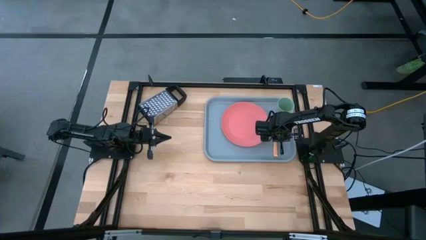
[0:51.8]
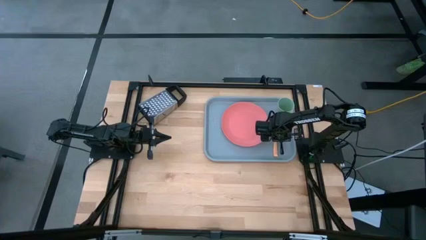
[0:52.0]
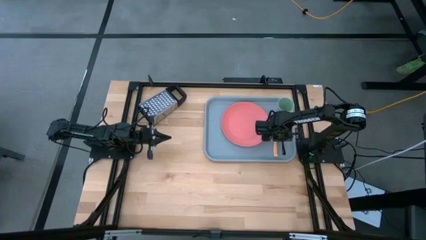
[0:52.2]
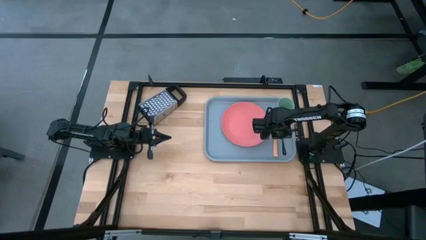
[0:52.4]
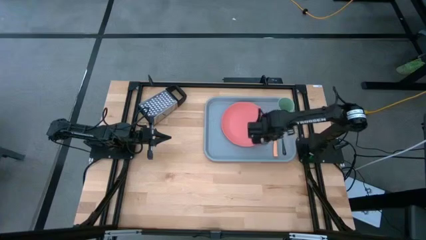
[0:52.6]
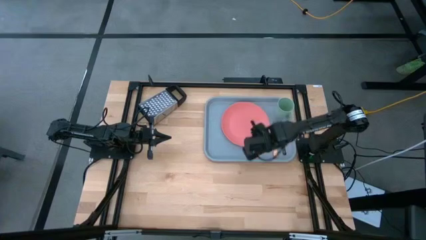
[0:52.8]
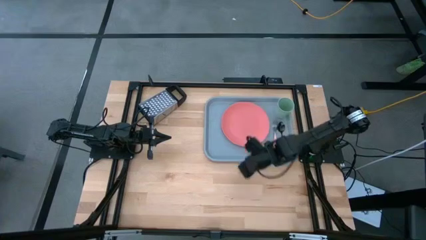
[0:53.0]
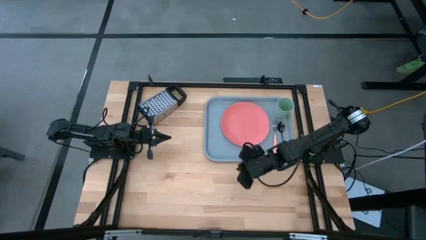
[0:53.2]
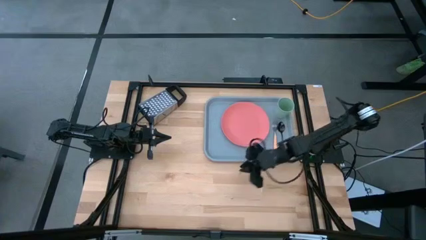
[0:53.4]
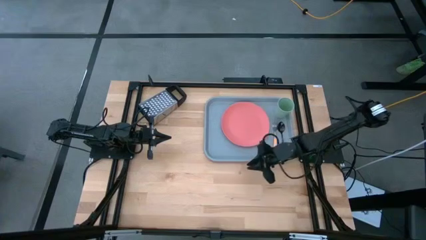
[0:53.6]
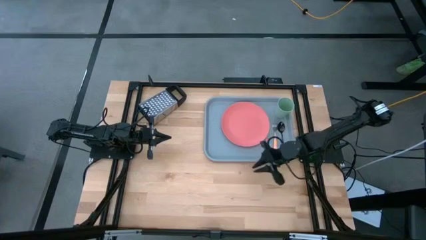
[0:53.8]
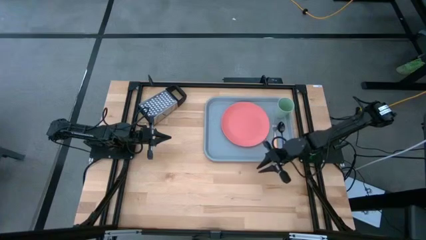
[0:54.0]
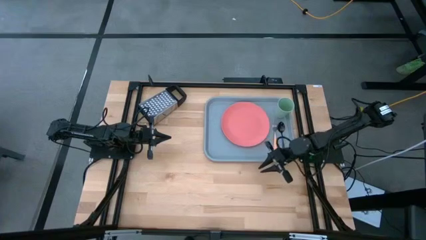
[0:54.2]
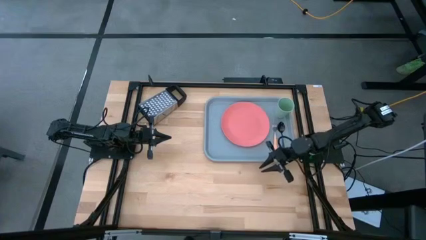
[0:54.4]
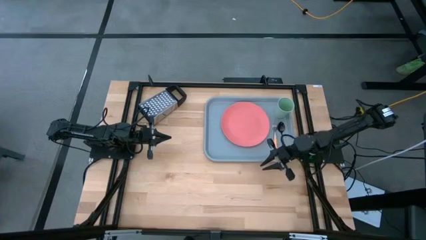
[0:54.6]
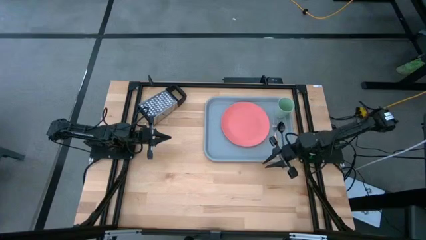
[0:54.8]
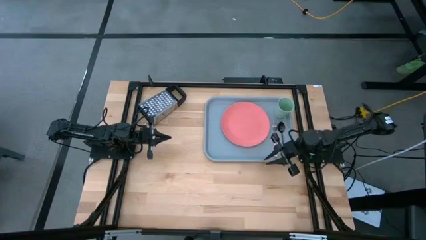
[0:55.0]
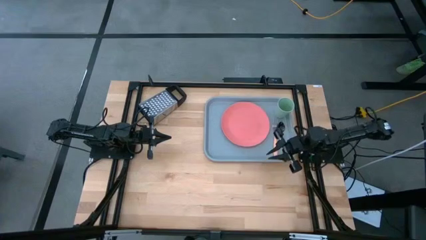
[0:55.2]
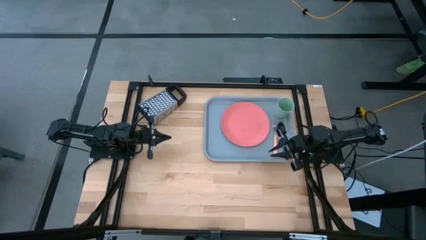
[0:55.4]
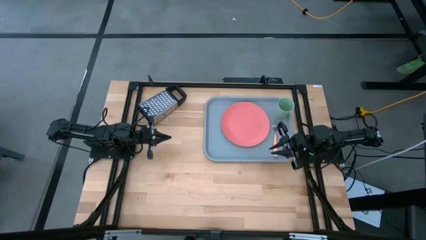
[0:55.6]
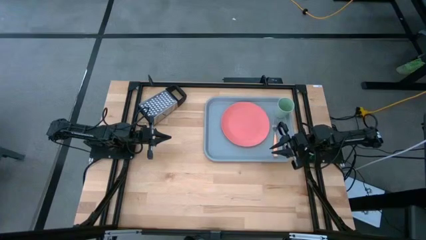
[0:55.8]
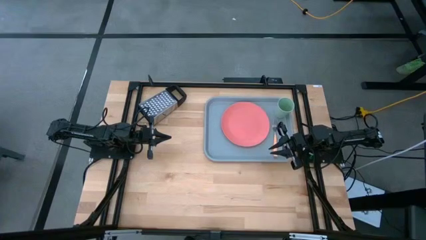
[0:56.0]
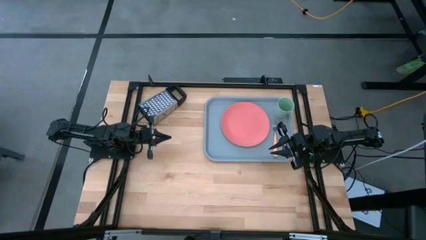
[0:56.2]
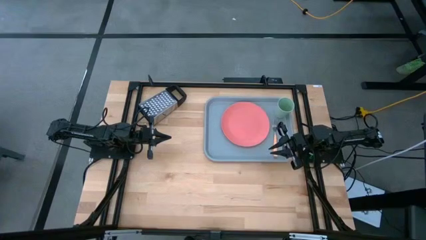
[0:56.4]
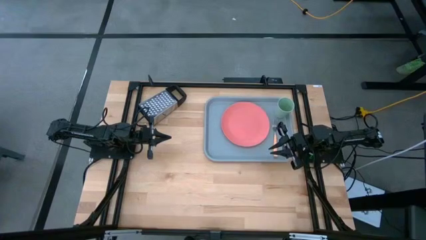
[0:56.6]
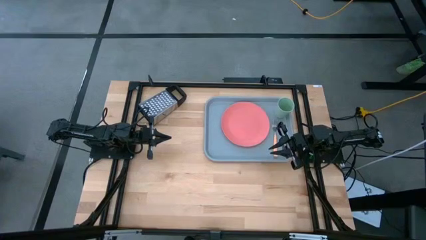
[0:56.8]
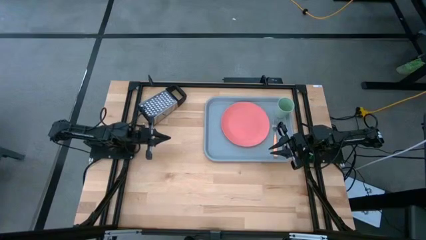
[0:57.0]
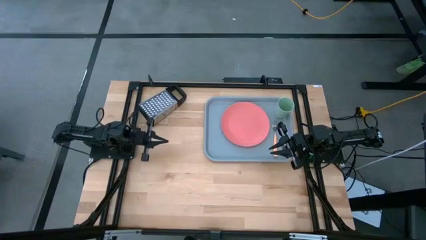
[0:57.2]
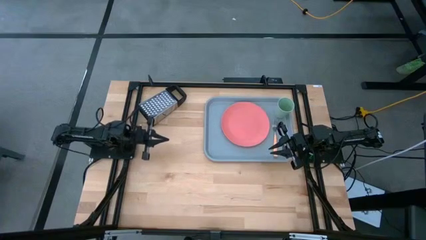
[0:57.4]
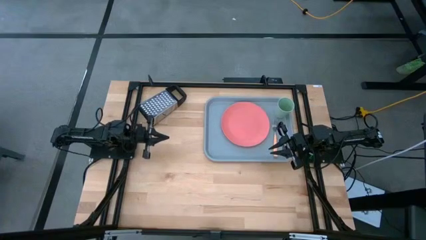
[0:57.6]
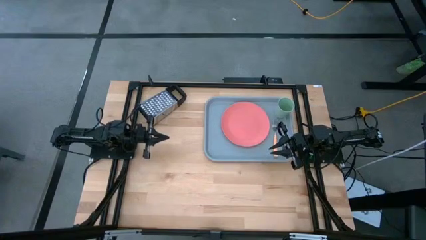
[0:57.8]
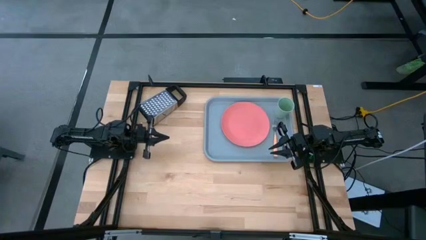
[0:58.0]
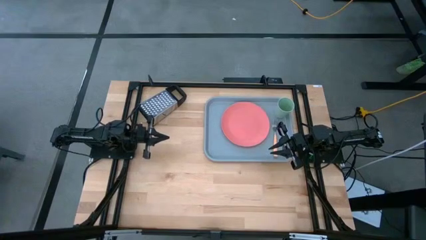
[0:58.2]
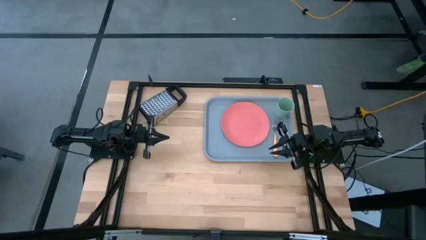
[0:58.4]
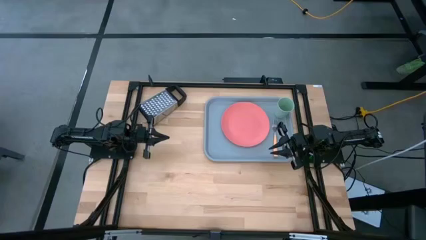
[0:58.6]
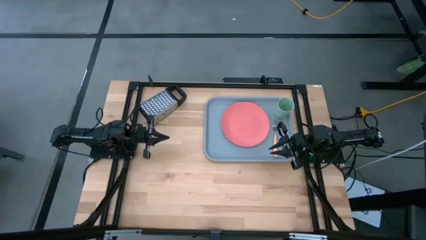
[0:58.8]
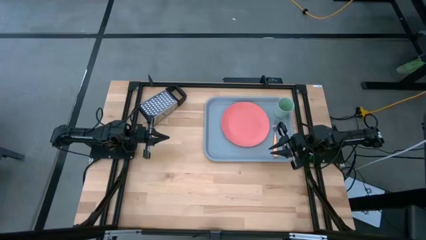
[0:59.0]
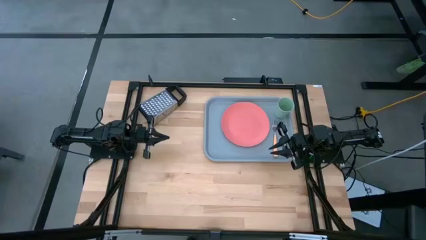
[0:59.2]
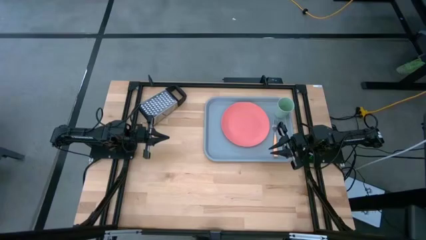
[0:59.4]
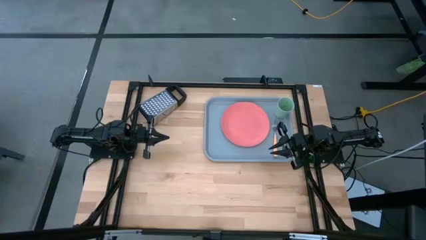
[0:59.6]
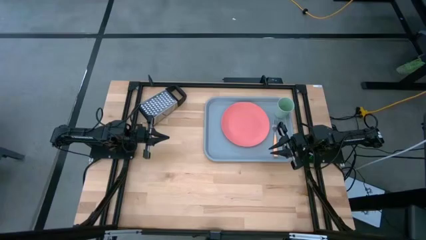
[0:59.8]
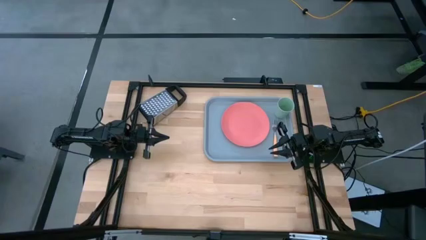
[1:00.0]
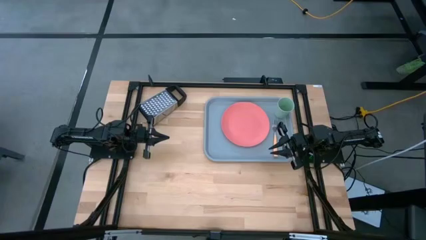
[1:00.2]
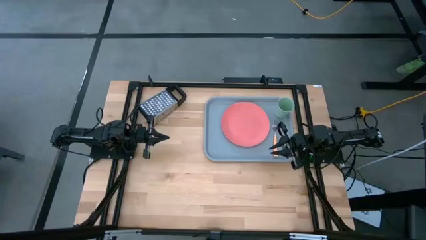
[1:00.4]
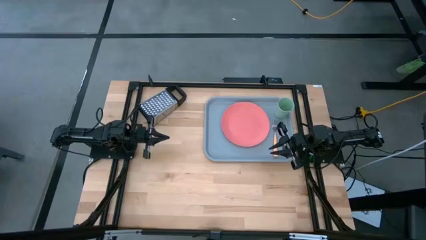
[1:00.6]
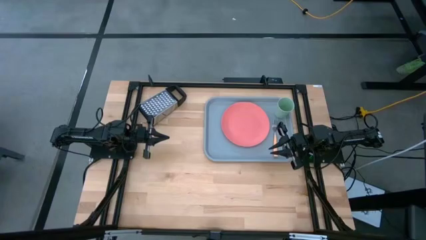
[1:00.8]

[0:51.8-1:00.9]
Task: Pick and place plate/cup/fork/spoon on tray
Return to Home Position

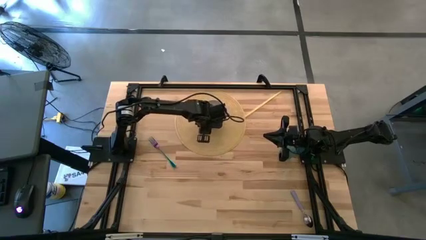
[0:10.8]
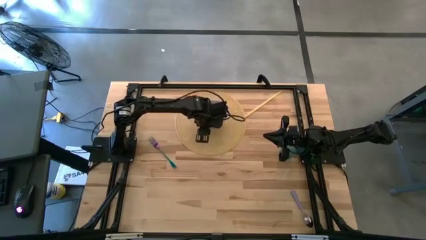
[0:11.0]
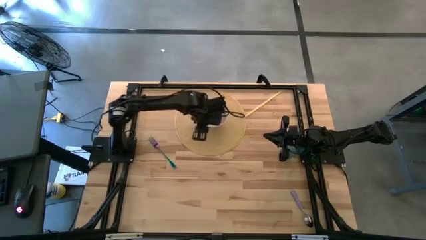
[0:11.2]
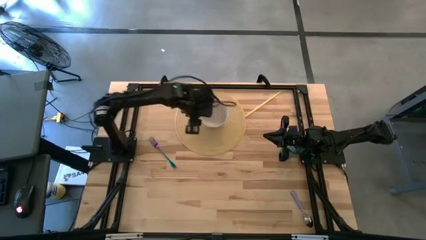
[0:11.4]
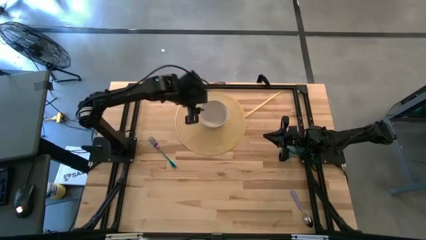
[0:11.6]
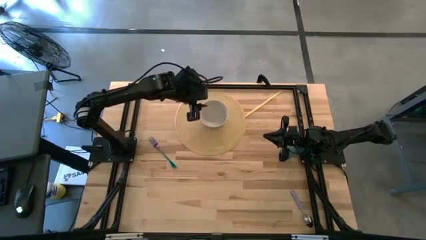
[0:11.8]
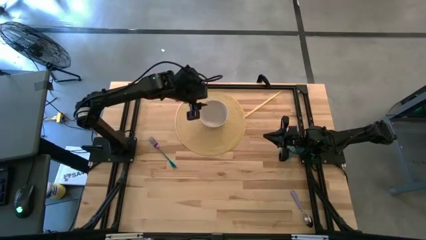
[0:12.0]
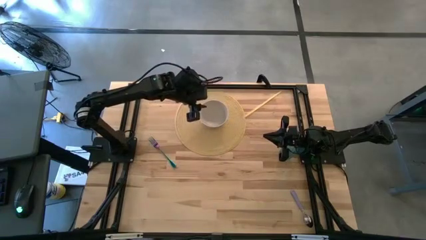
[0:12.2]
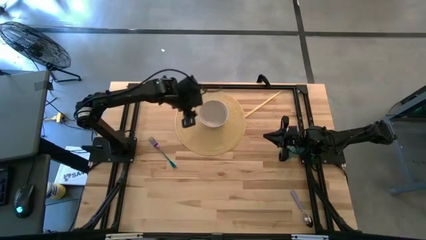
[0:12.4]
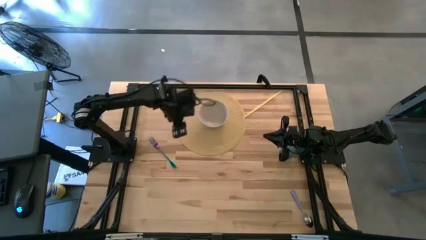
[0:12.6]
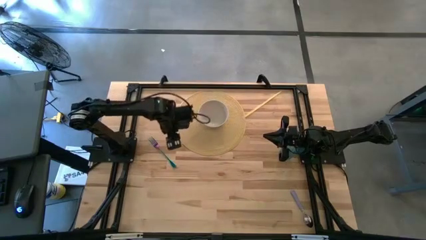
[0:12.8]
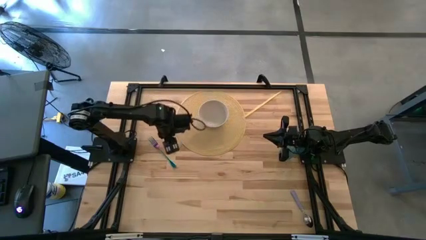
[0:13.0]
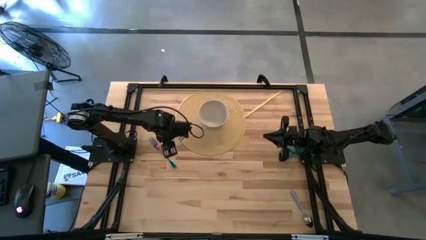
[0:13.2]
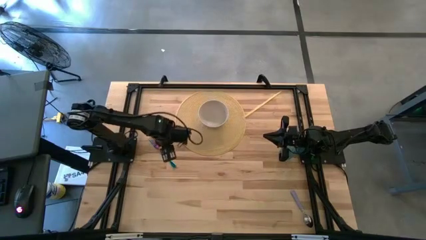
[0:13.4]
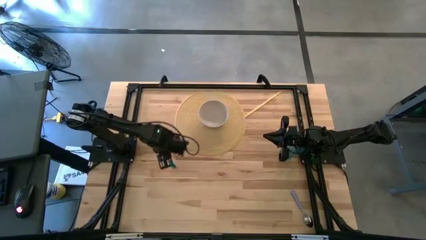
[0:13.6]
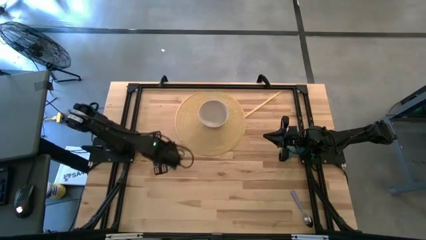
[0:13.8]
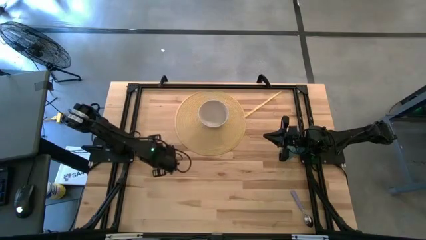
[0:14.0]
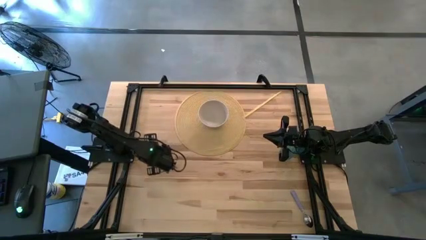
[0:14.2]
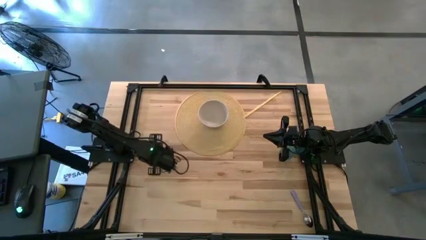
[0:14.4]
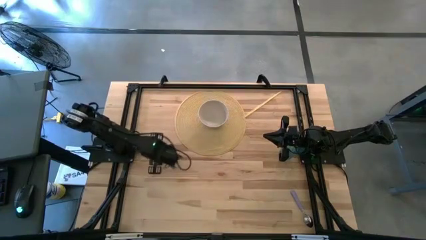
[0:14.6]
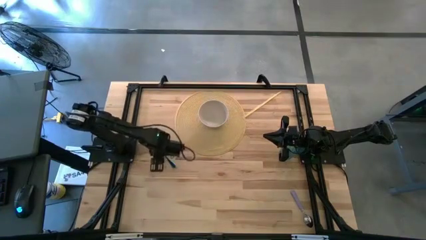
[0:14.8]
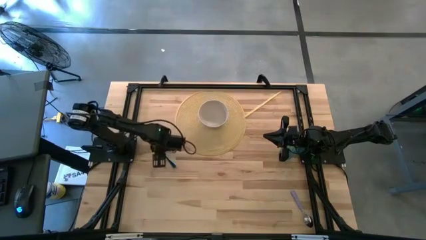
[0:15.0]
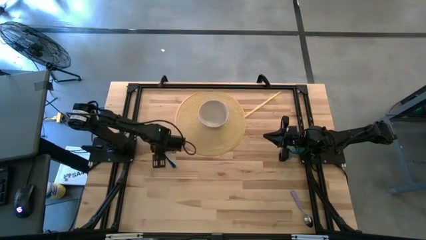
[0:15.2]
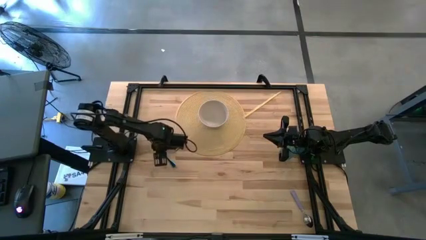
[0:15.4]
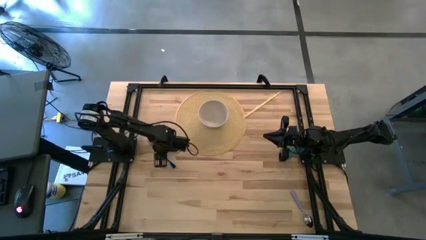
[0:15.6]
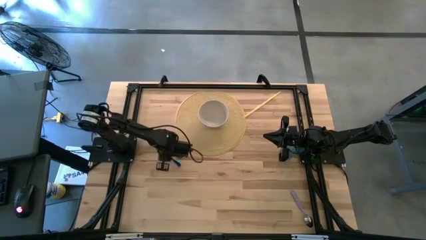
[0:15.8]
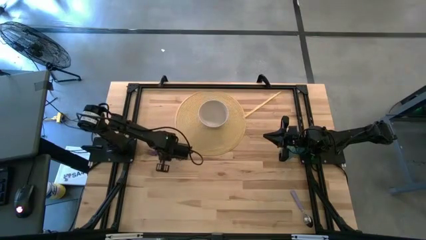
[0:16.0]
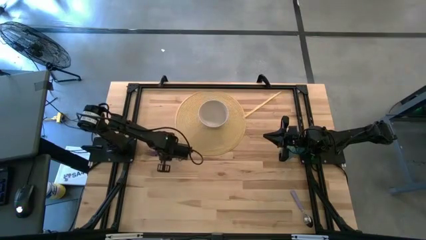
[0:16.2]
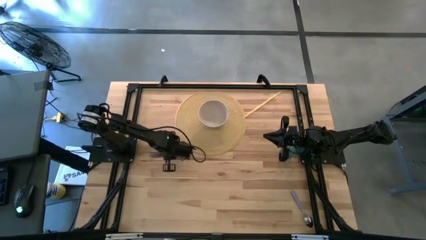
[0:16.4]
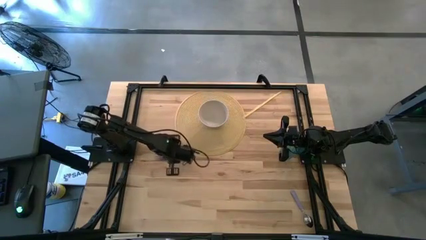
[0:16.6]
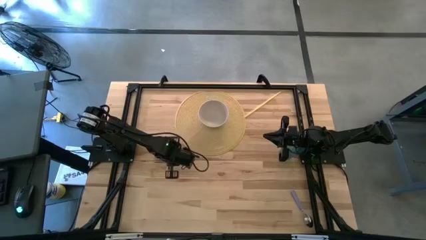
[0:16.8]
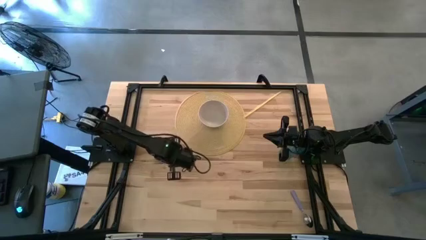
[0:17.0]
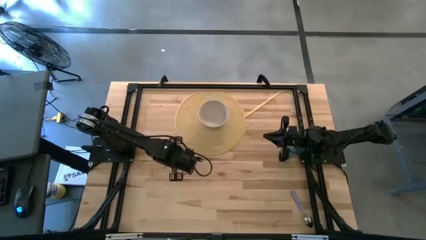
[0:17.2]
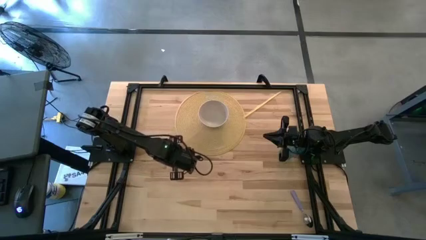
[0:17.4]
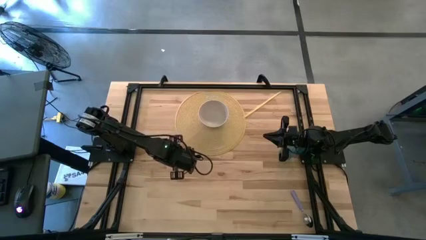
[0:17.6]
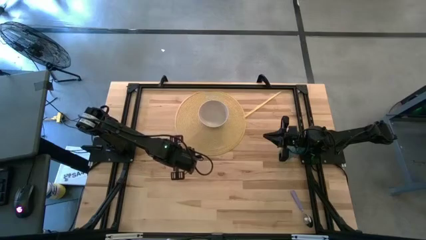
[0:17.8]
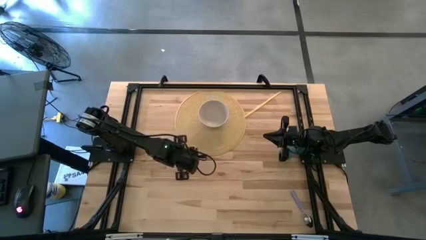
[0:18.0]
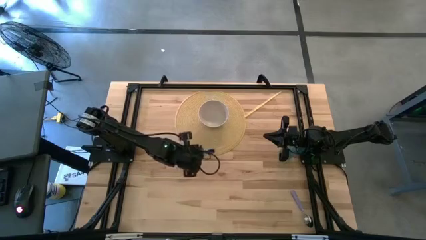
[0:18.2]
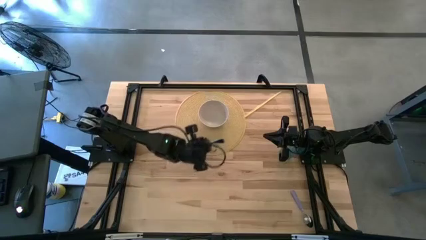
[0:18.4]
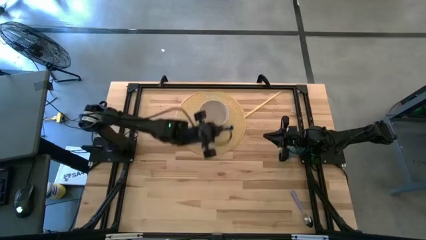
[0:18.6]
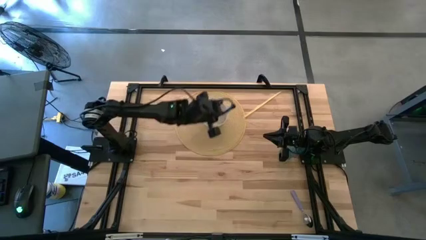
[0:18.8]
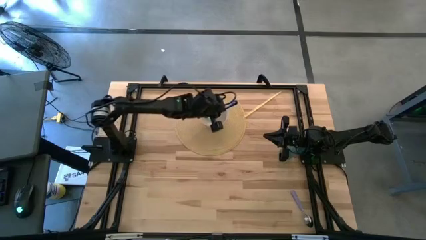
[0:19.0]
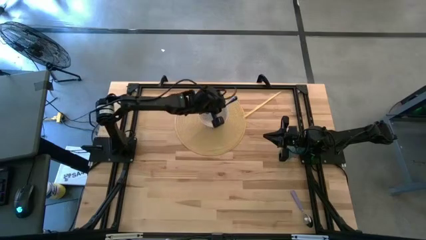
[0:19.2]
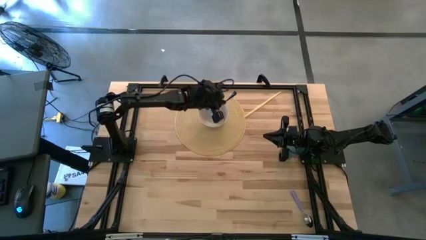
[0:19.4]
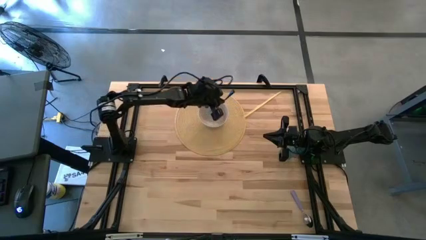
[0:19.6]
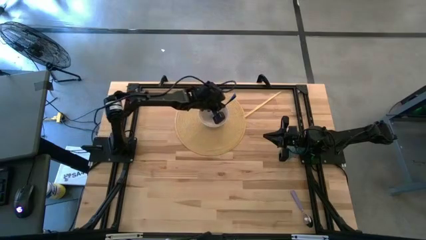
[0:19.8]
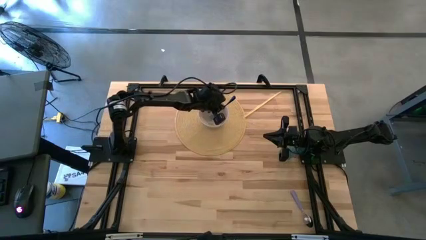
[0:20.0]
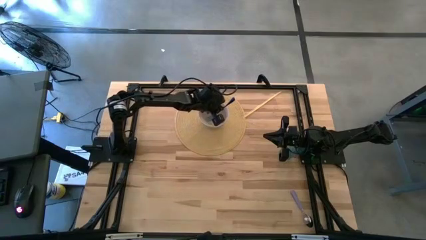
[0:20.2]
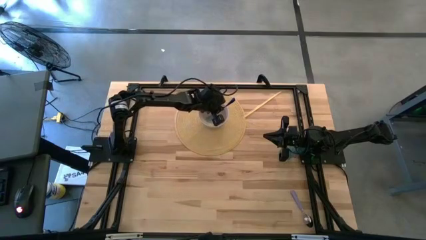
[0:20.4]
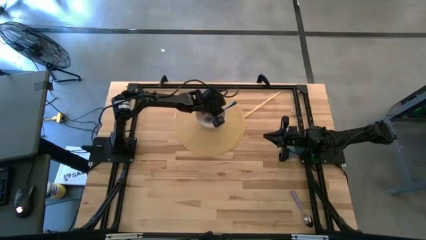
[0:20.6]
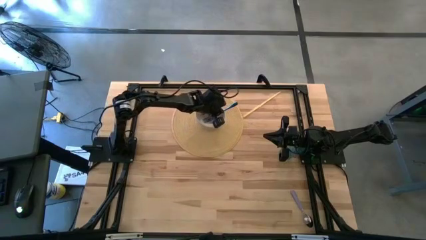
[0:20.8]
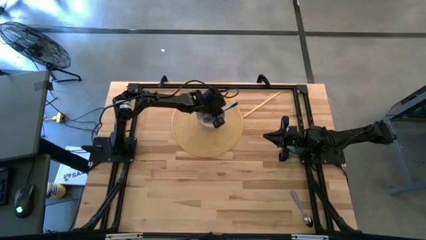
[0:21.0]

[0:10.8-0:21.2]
Task: Pick & Place Utensil
Put the blue fork into the white bowl
